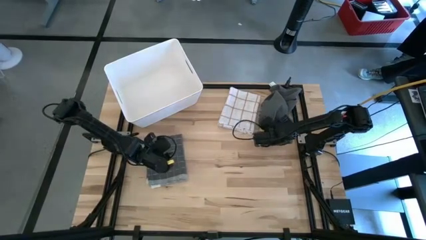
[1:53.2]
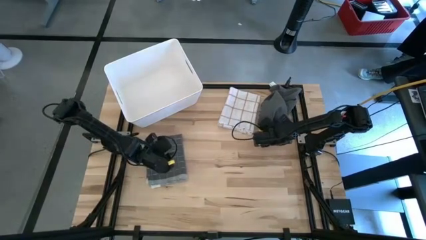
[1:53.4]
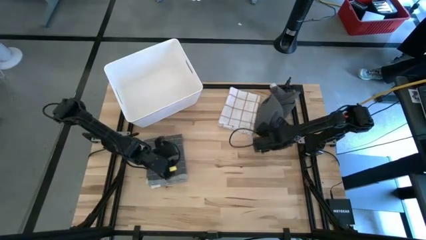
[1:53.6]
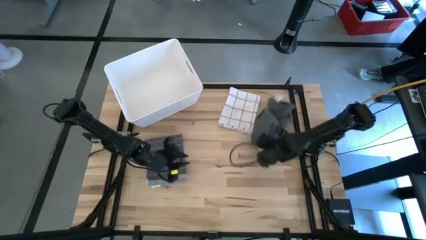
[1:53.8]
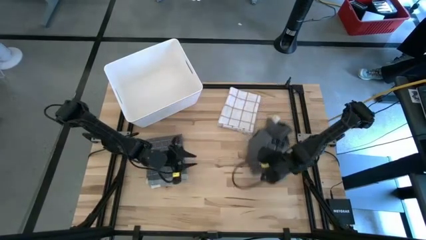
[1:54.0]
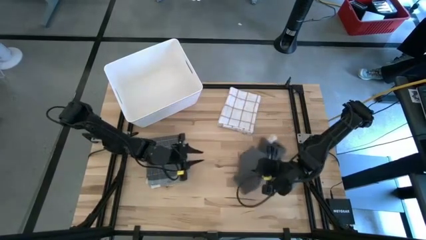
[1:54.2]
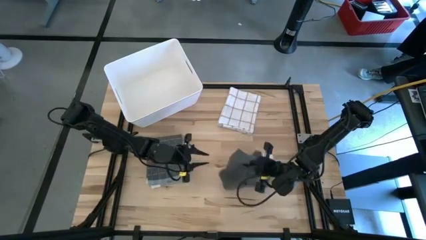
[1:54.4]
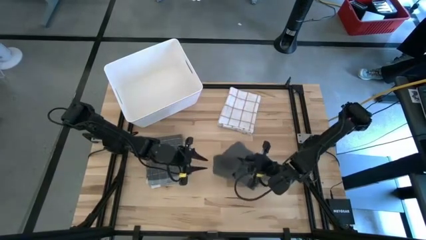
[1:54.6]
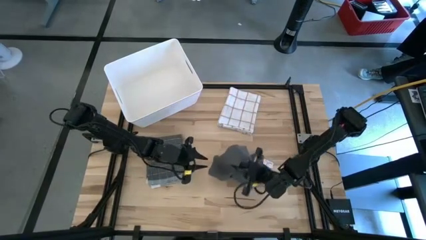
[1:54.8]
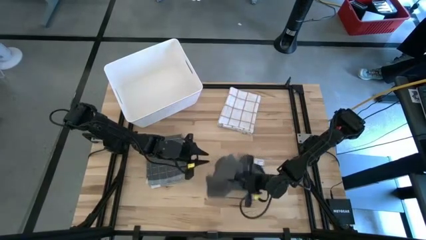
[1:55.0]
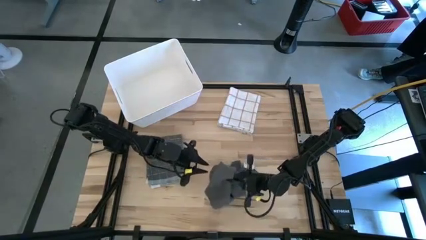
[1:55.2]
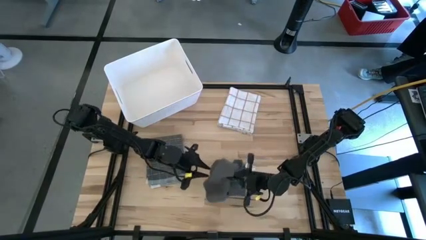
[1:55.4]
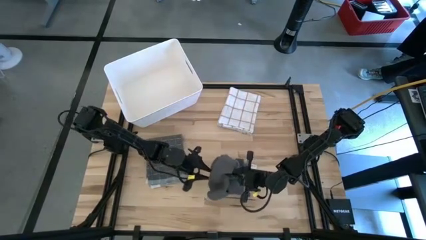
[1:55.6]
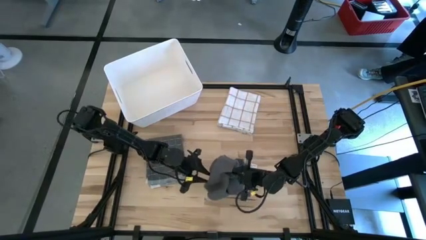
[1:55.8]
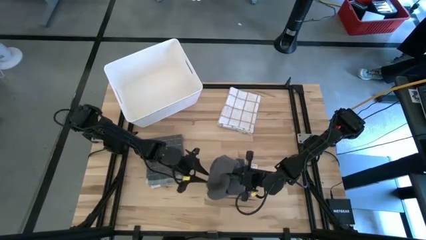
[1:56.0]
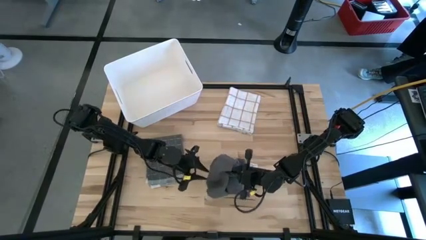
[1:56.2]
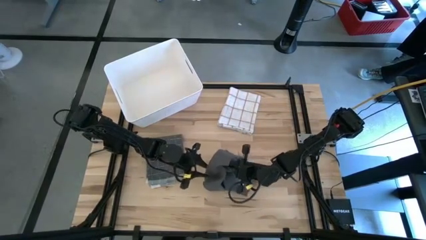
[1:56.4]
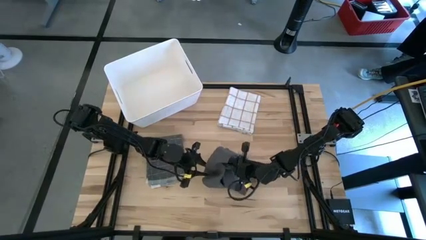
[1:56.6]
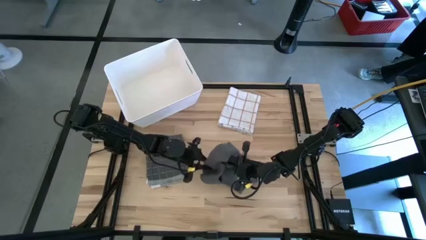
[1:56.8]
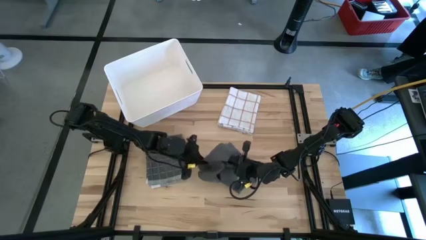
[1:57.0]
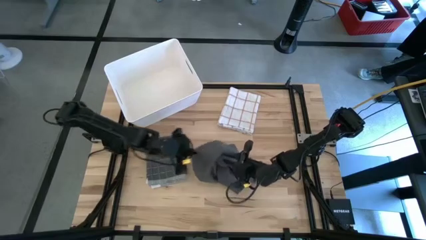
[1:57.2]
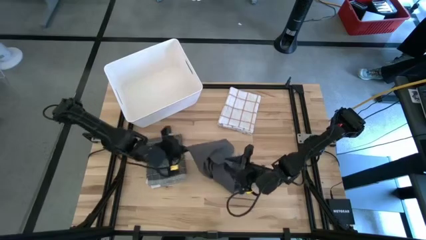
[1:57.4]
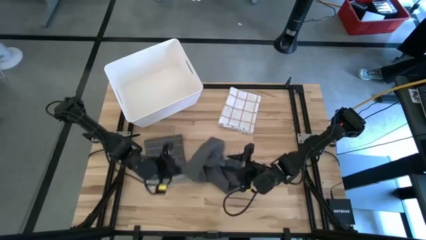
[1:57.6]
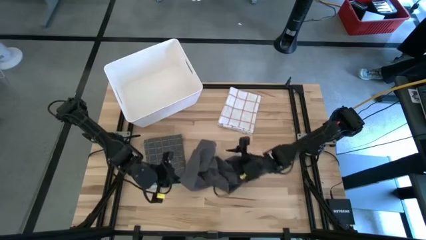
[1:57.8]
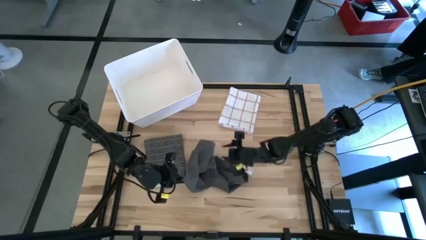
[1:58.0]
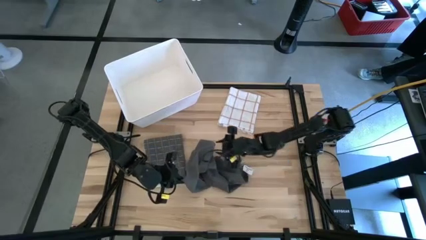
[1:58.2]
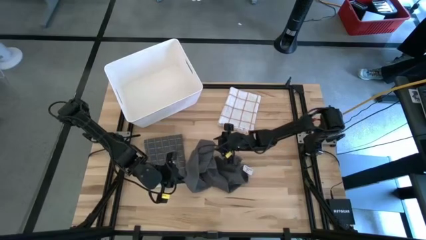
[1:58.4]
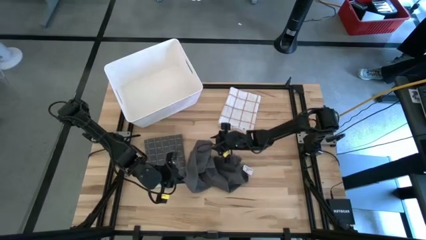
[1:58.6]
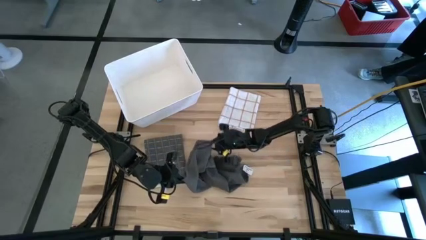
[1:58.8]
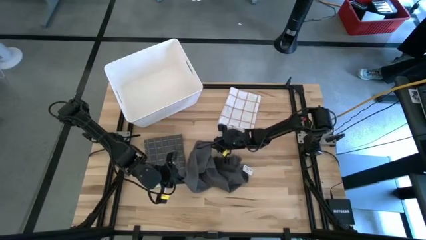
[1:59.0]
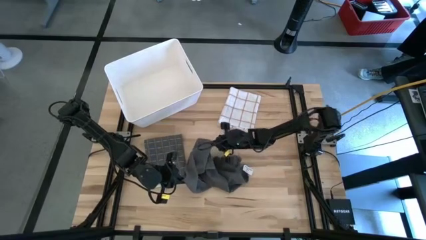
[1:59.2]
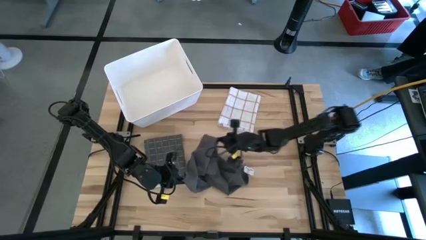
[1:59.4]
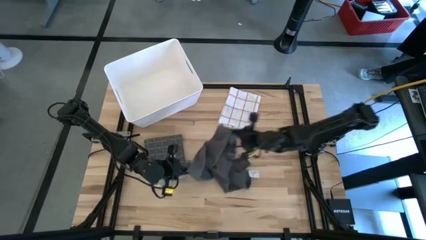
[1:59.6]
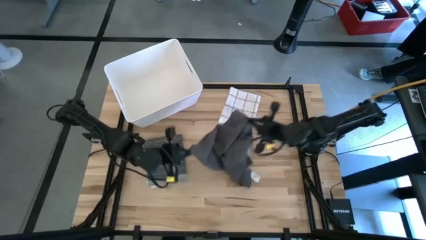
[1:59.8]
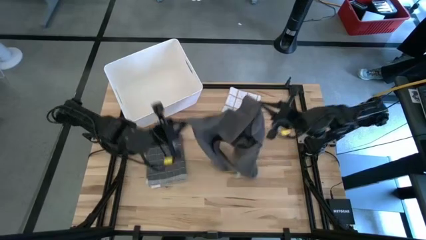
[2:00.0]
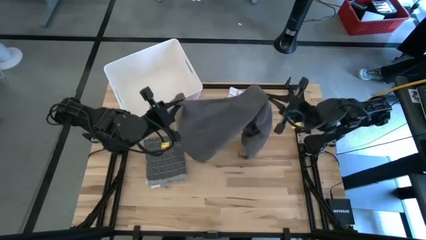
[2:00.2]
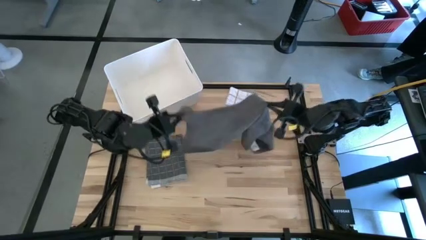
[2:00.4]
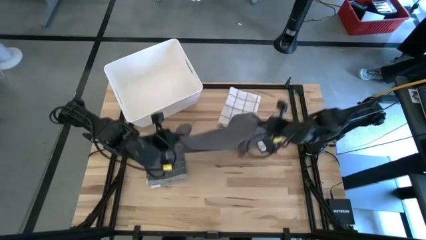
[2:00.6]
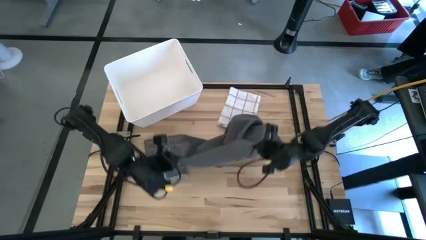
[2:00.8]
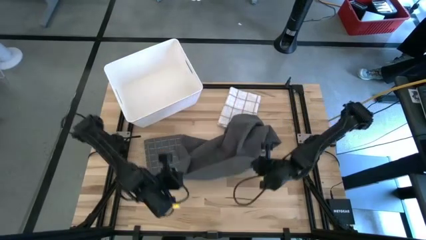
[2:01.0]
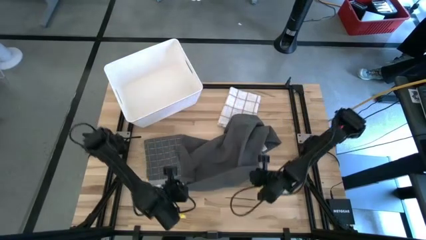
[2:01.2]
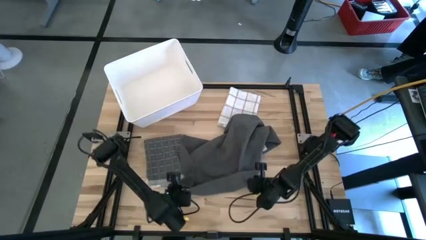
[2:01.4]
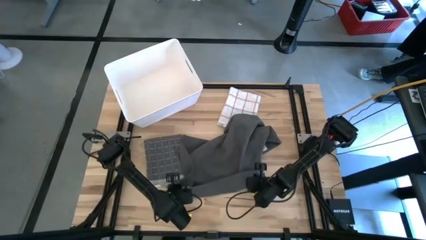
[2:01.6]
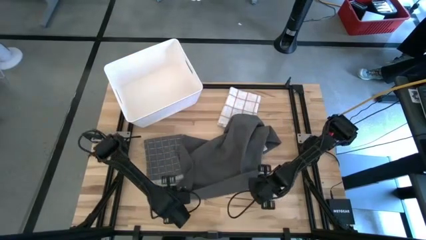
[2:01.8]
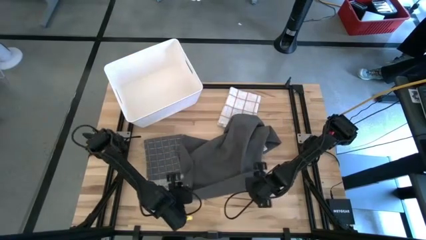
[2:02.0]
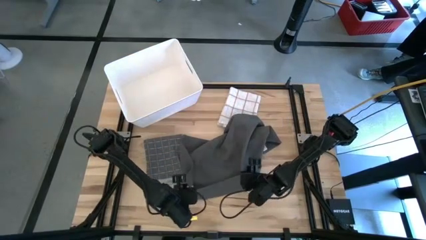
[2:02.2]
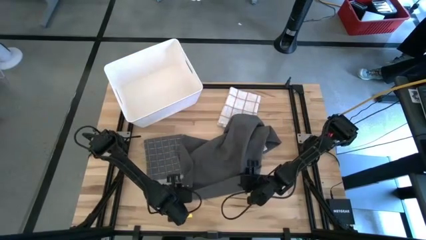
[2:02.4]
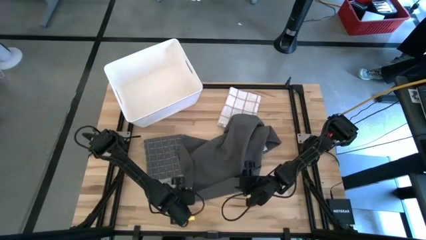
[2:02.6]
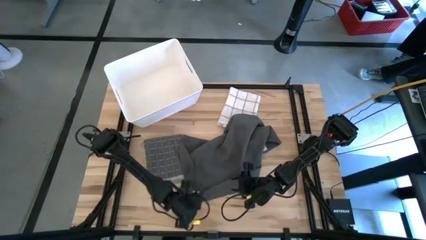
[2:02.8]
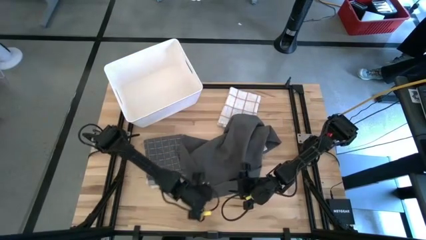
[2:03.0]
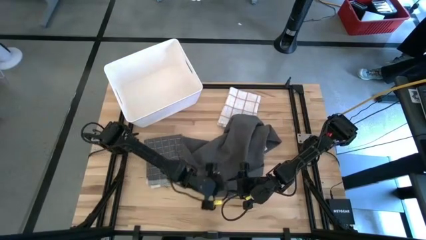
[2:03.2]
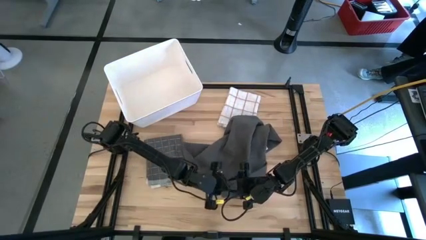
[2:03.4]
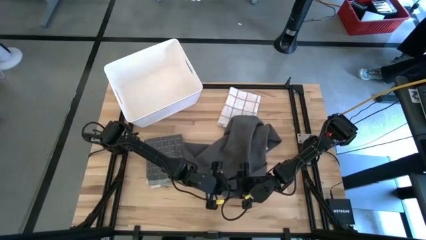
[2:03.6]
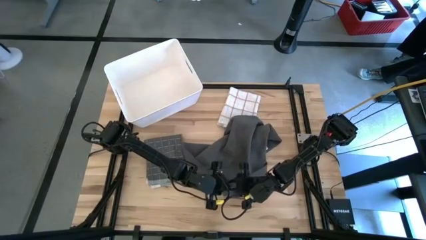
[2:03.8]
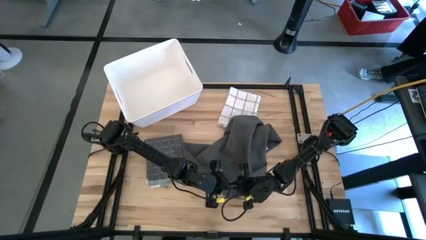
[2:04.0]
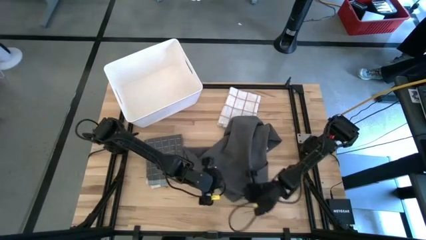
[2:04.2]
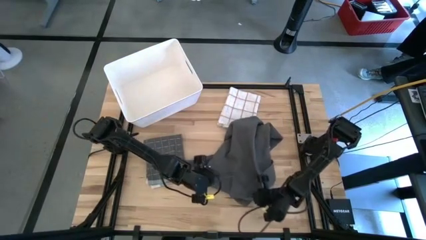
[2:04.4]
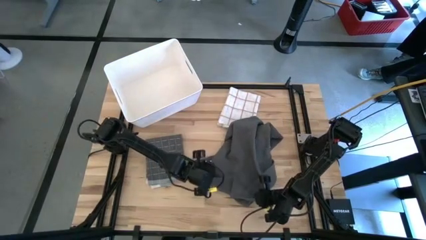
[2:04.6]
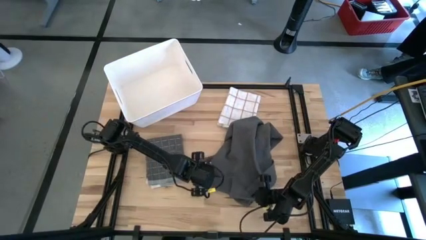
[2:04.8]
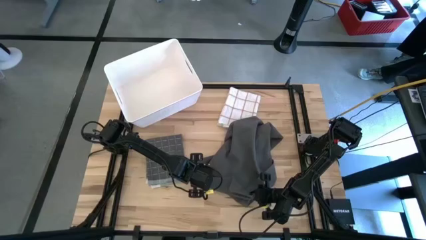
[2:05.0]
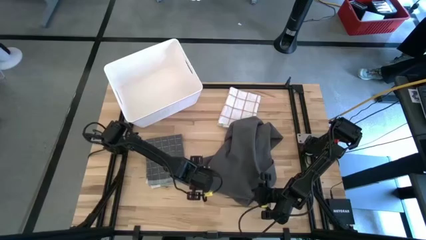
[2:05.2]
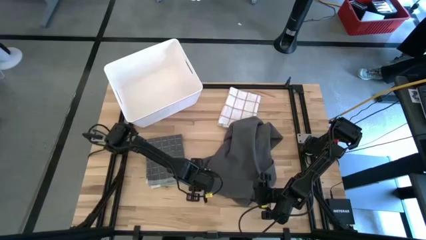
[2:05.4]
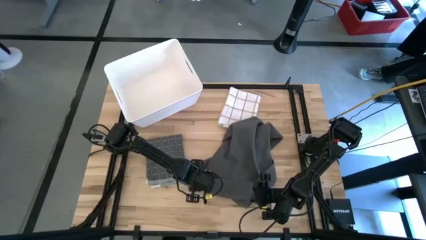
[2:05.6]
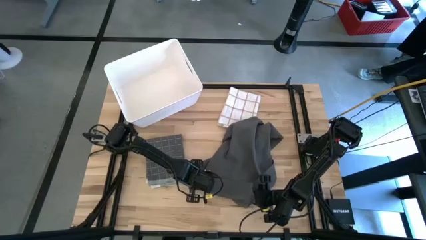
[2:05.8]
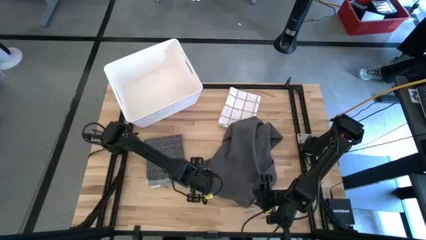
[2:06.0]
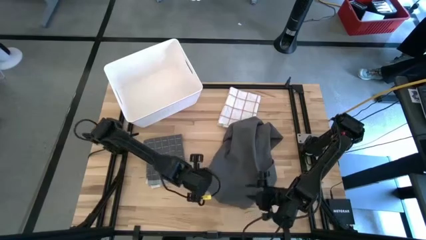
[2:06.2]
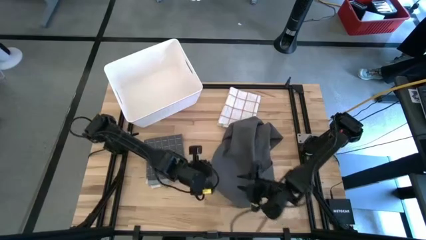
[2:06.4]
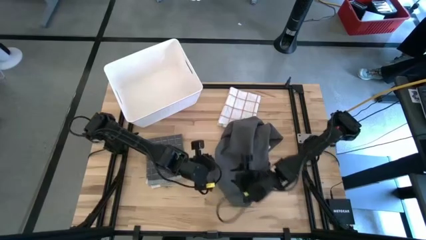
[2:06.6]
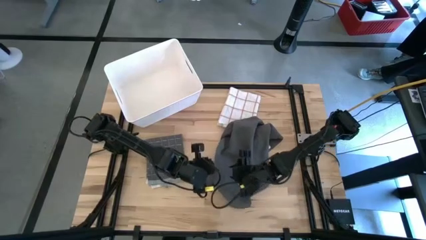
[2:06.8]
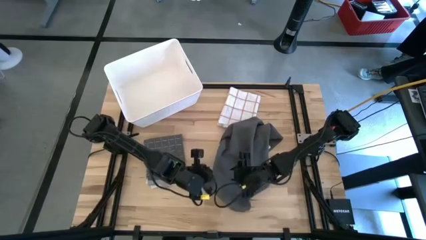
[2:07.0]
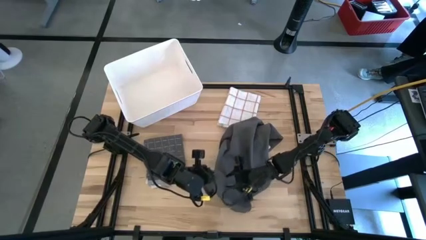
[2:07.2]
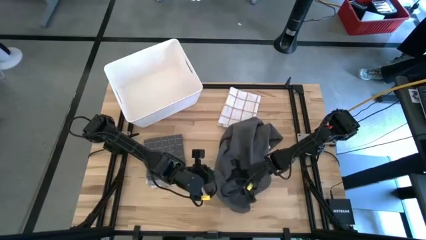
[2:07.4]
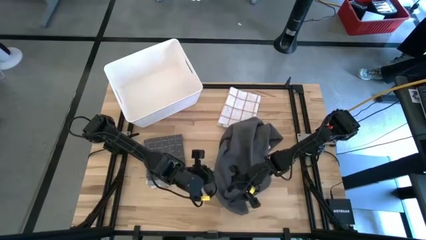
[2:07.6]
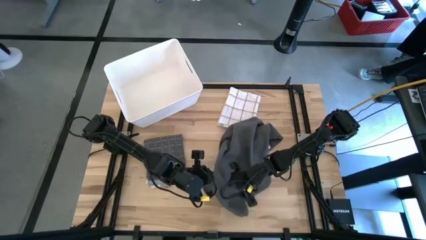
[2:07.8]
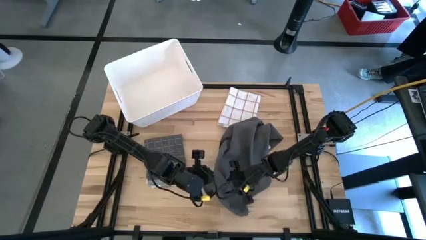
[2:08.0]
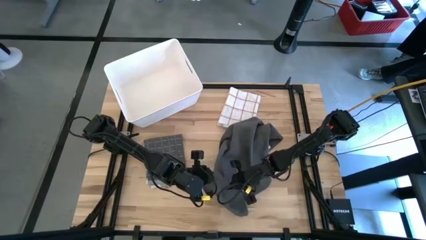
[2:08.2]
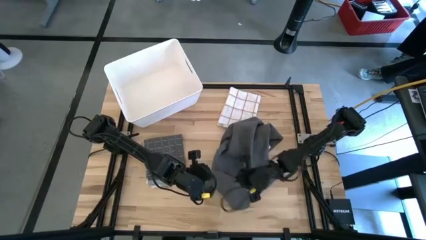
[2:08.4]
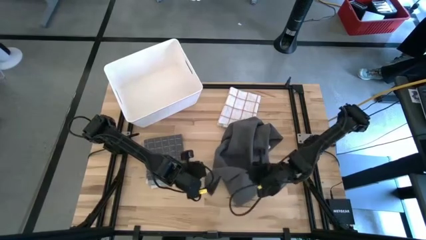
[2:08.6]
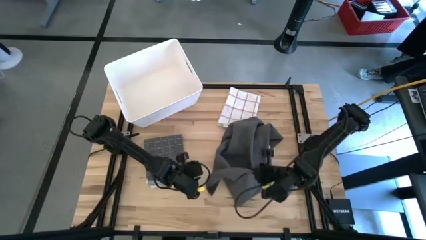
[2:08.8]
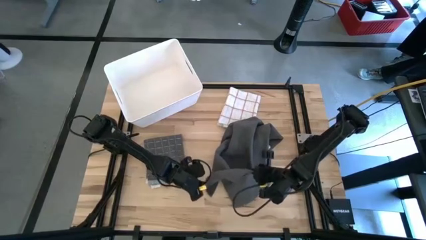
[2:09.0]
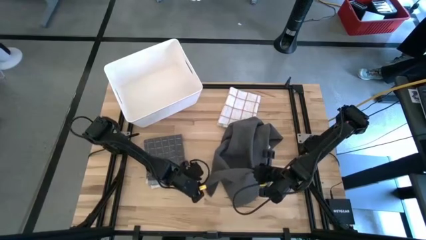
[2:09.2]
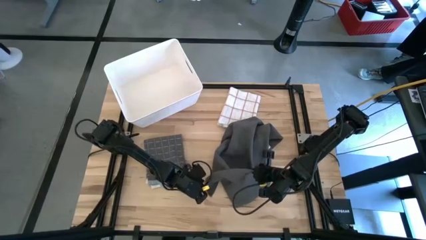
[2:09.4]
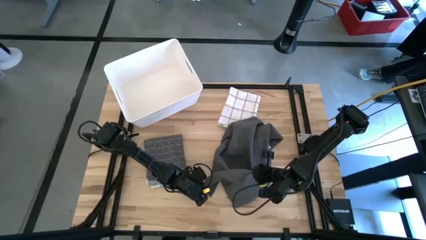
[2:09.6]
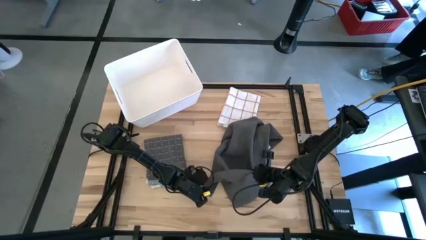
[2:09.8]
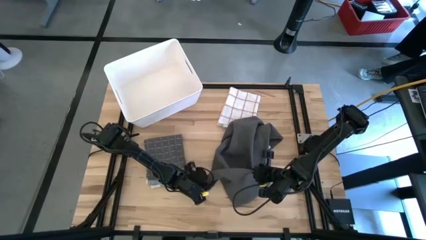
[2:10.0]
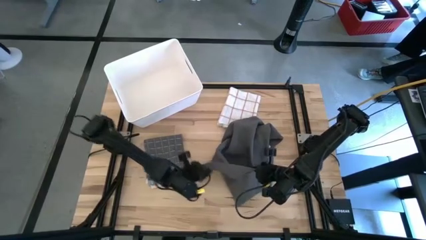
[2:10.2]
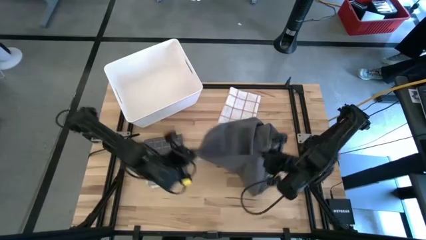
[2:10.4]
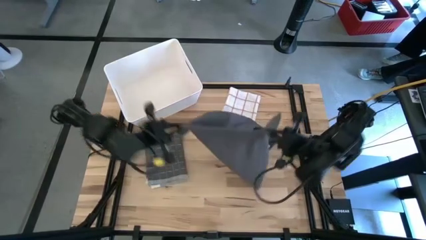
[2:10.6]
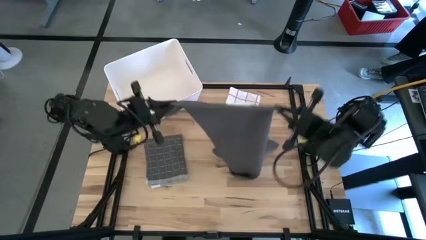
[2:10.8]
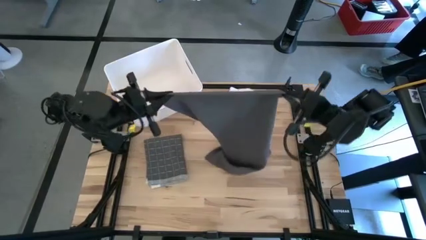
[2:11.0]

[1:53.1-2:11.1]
Task: Fold towel
Fold the gray towel
